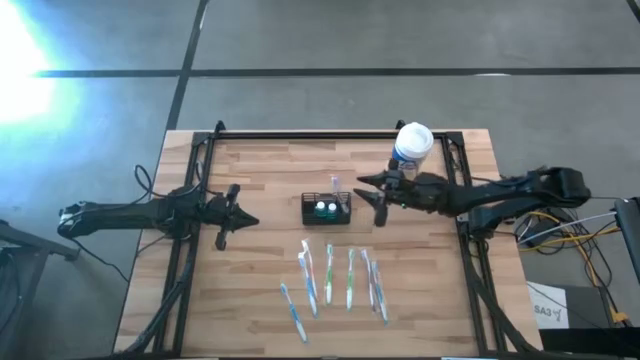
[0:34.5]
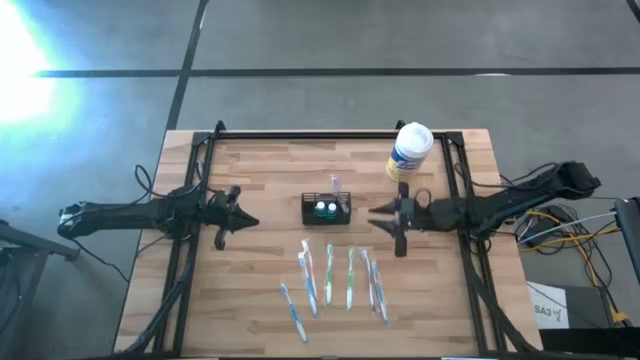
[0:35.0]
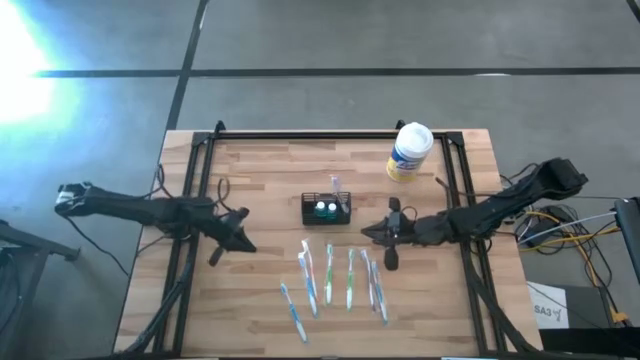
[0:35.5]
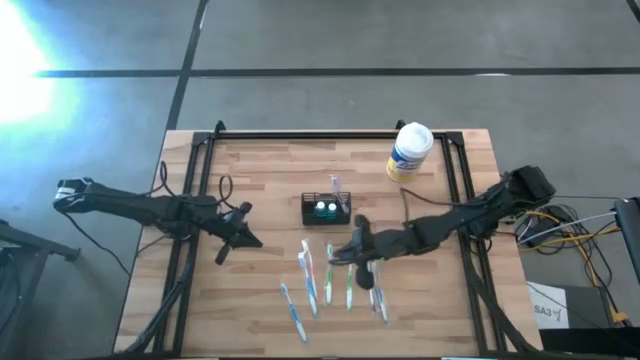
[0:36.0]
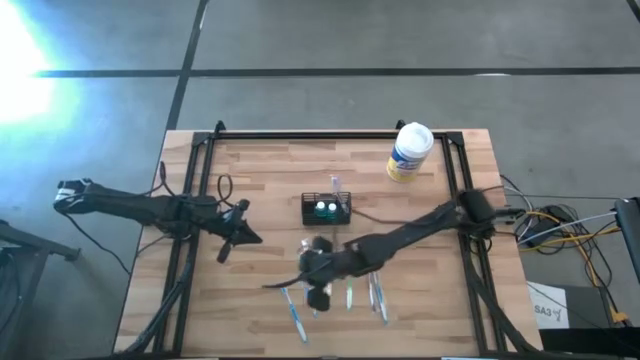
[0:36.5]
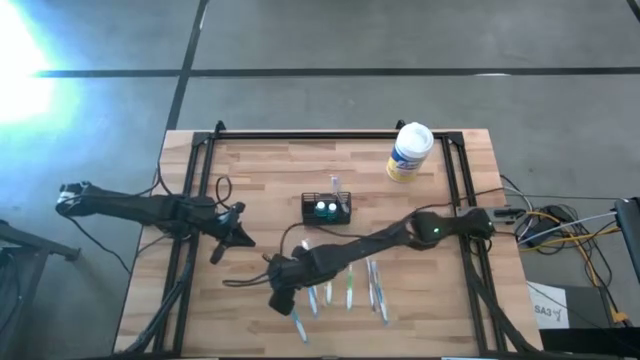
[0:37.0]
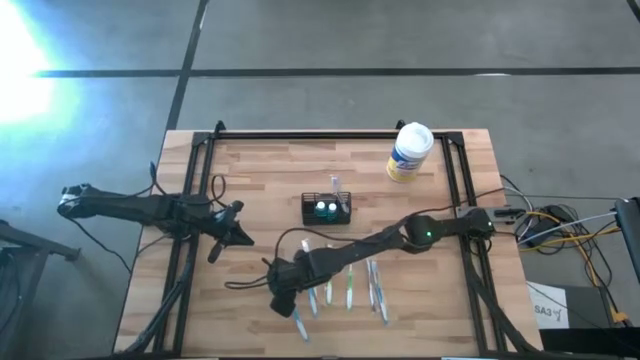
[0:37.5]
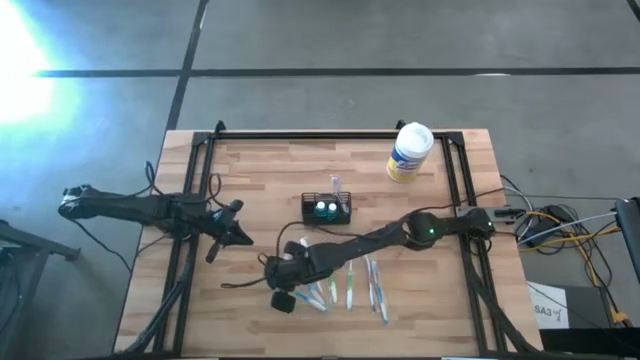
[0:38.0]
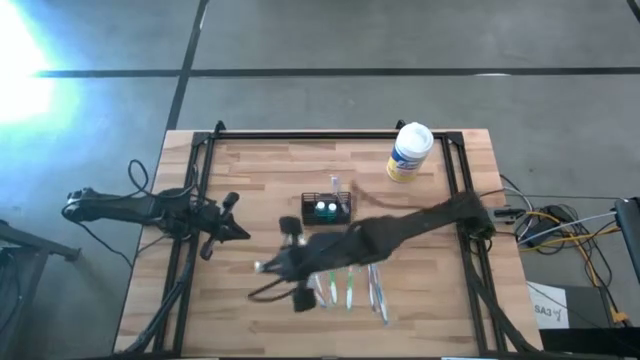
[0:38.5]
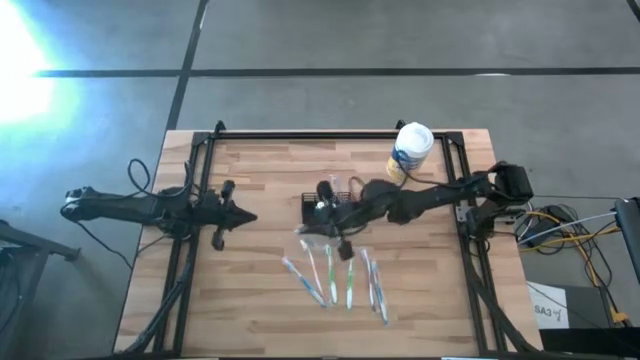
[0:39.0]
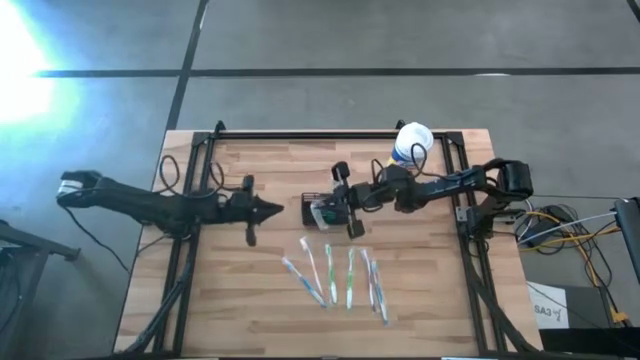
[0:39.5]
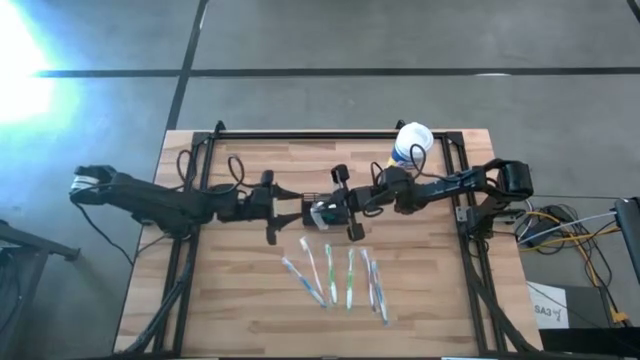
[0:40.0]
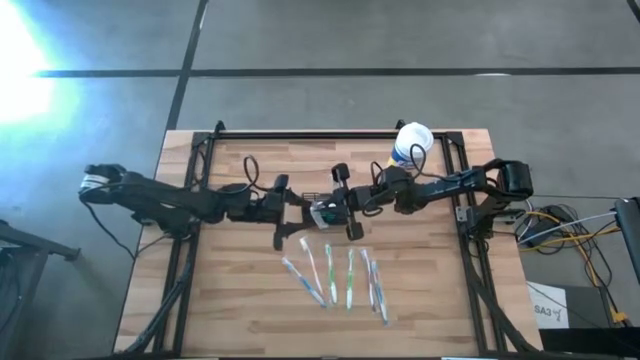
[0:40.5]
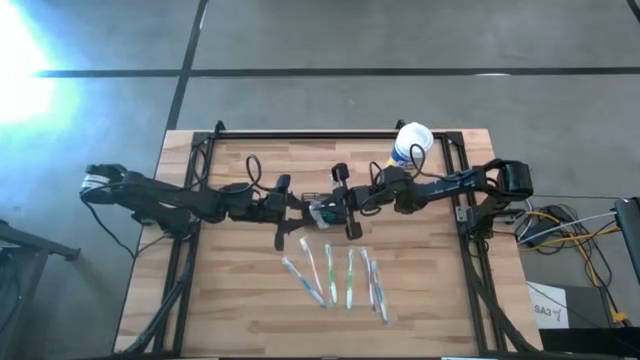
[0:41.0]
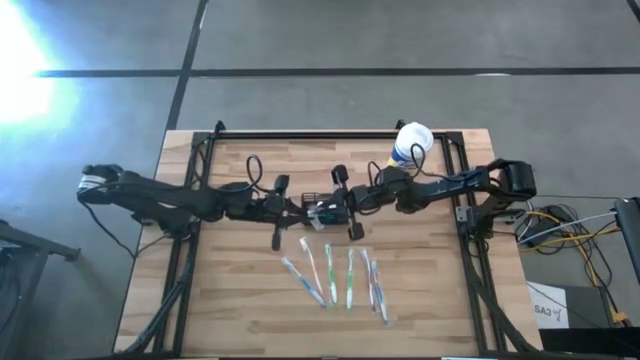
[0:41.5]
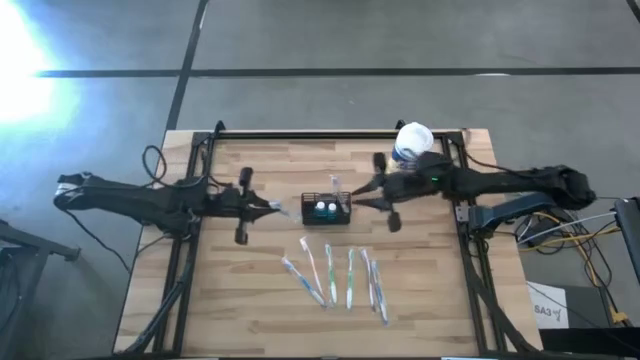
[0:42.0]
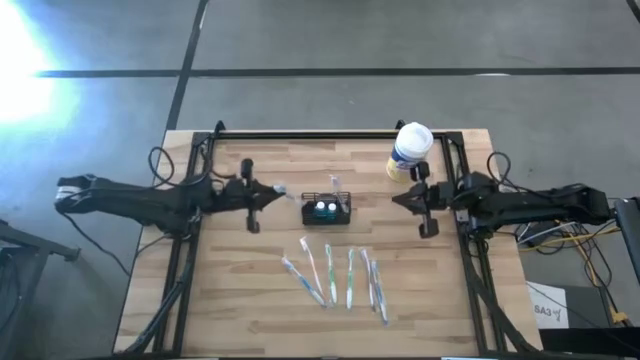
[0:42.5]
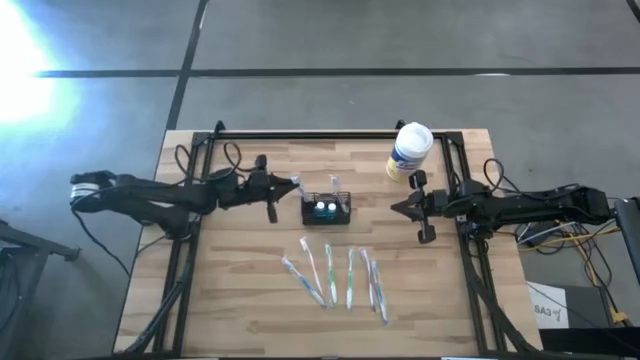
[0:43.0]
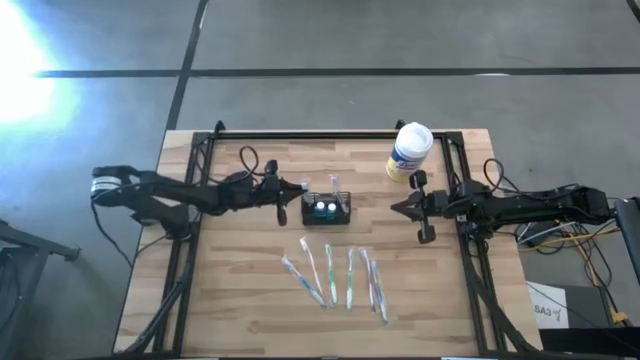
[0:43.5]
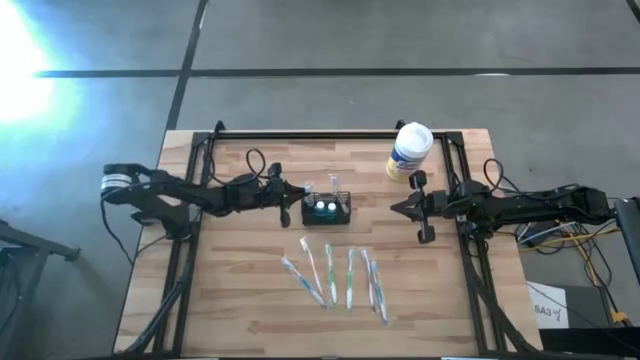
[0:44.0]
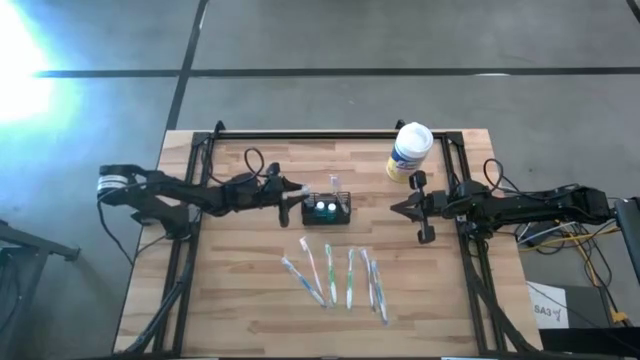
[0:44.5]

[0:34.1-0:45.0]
Task: Pick & Place toothbrushing station
Put the left blue toothbrush into the black wire organizer

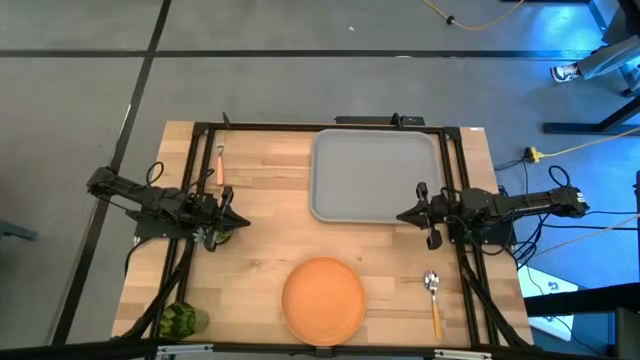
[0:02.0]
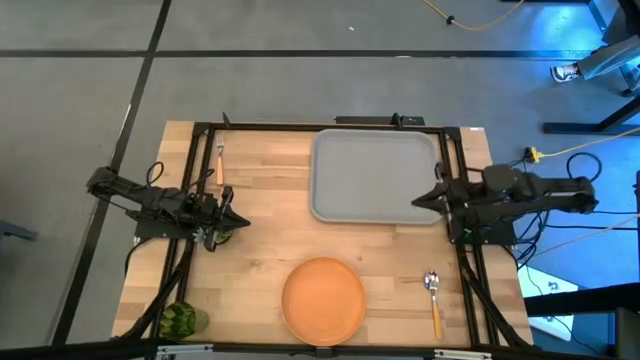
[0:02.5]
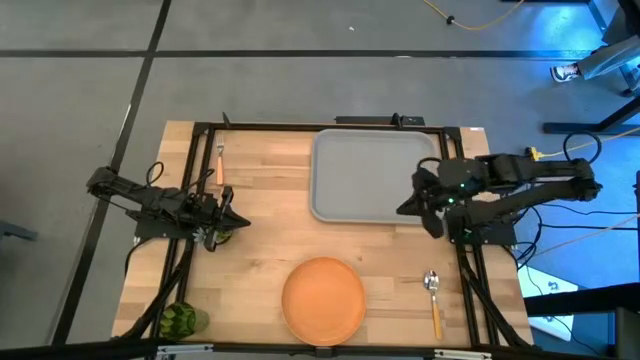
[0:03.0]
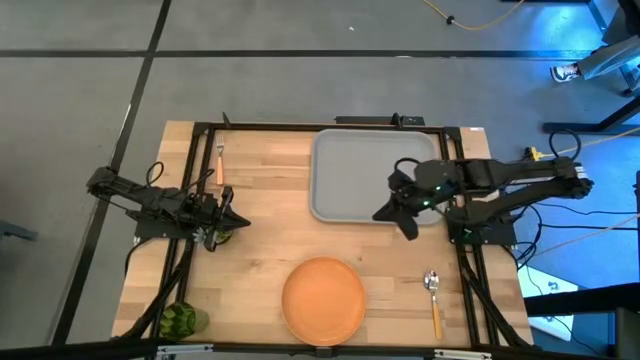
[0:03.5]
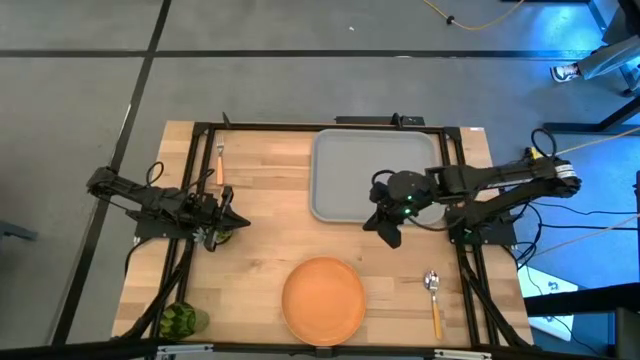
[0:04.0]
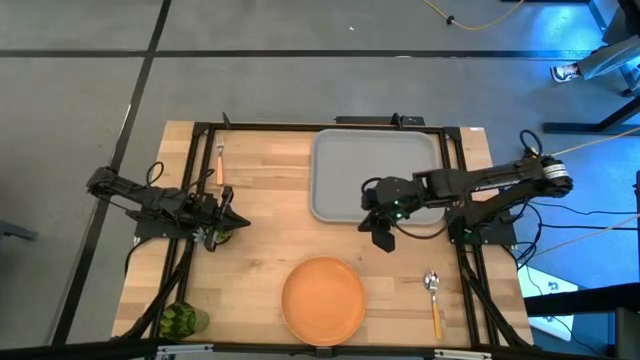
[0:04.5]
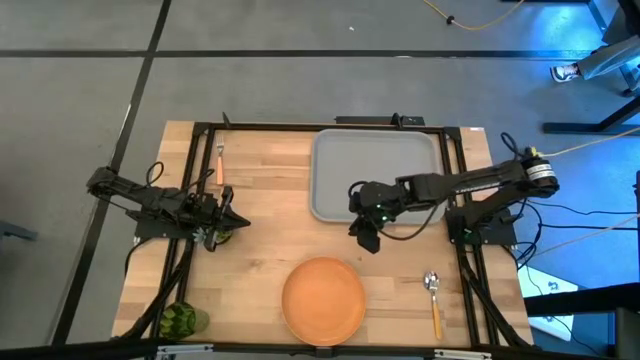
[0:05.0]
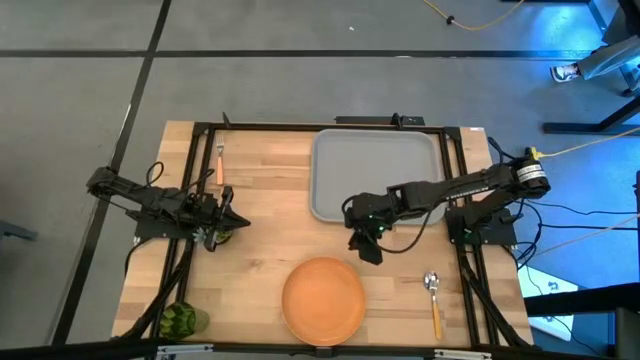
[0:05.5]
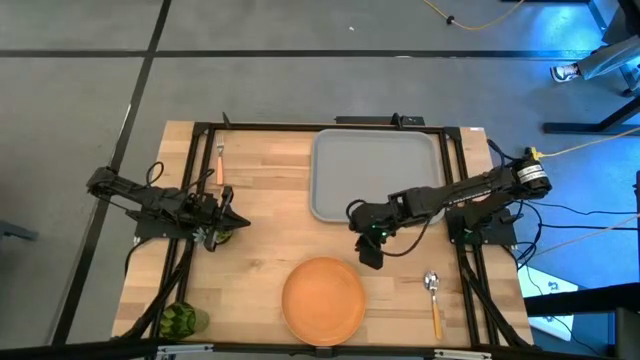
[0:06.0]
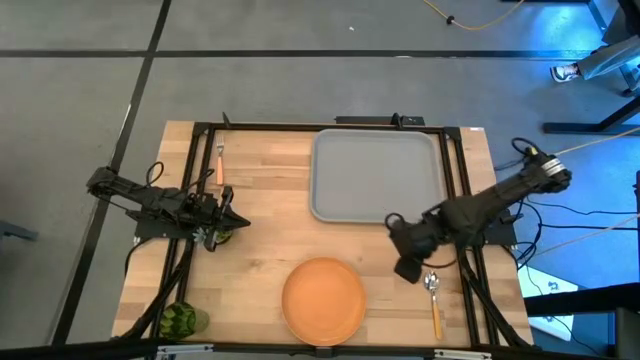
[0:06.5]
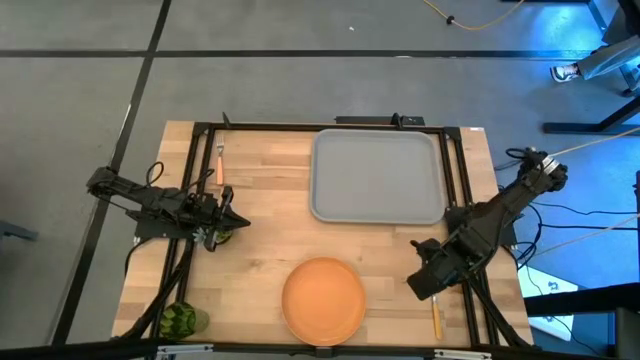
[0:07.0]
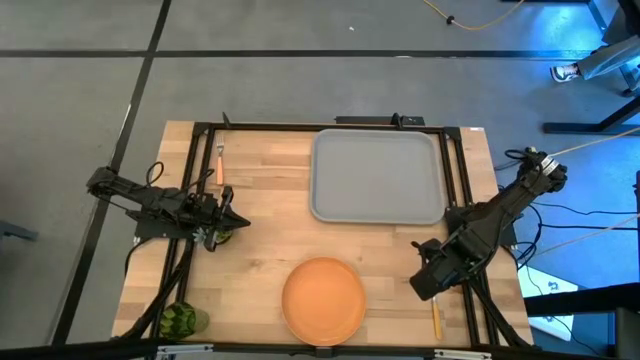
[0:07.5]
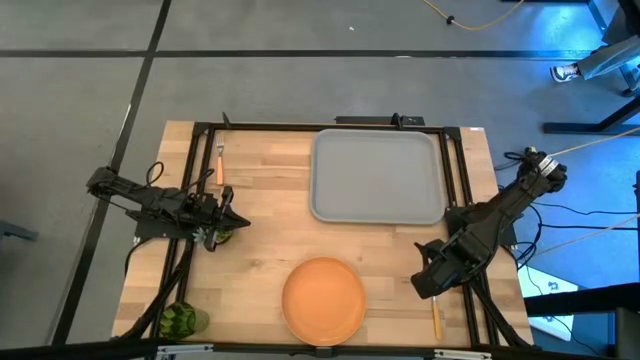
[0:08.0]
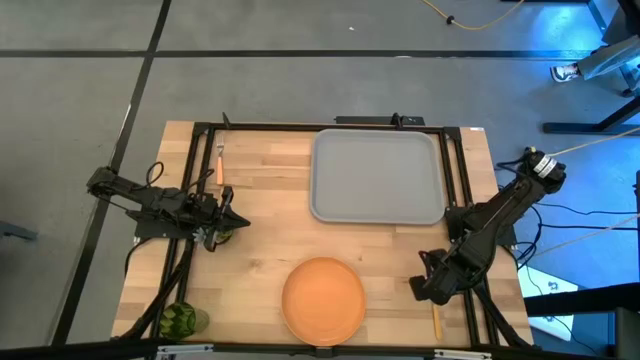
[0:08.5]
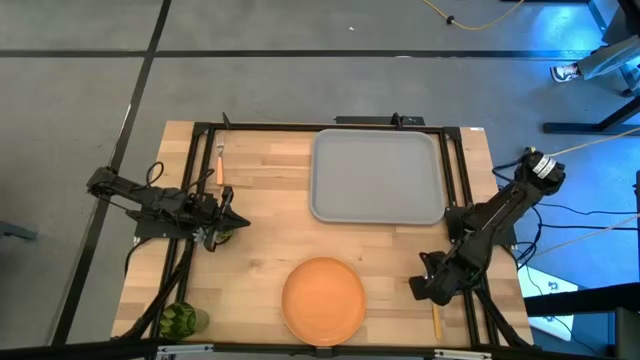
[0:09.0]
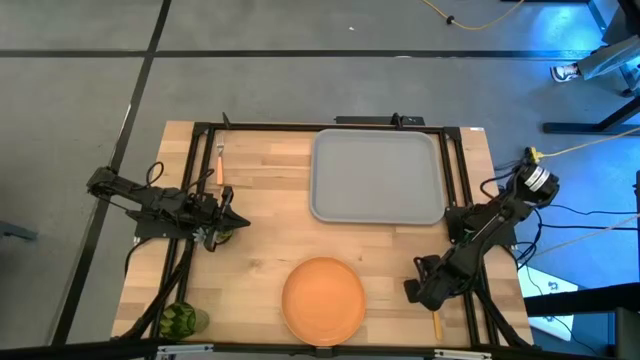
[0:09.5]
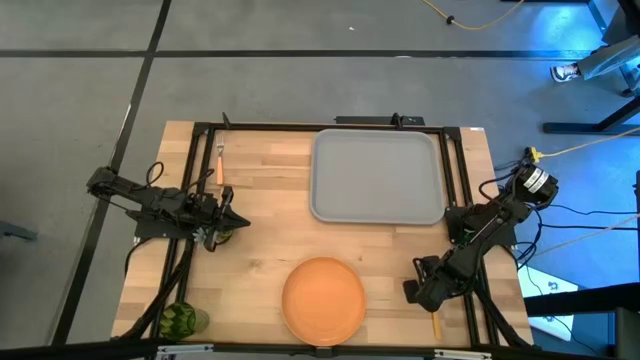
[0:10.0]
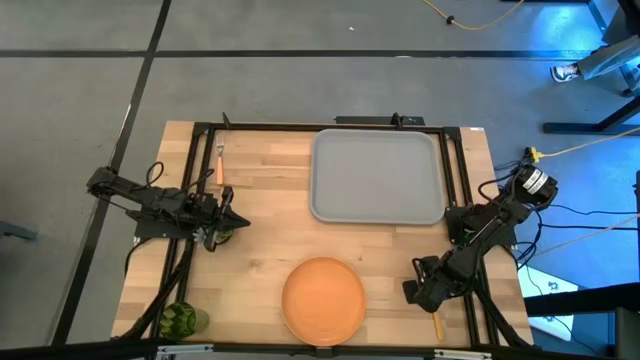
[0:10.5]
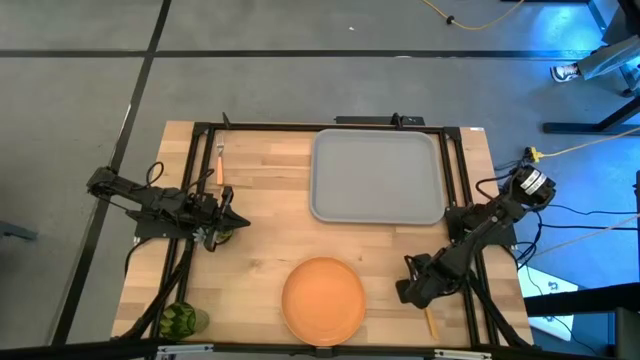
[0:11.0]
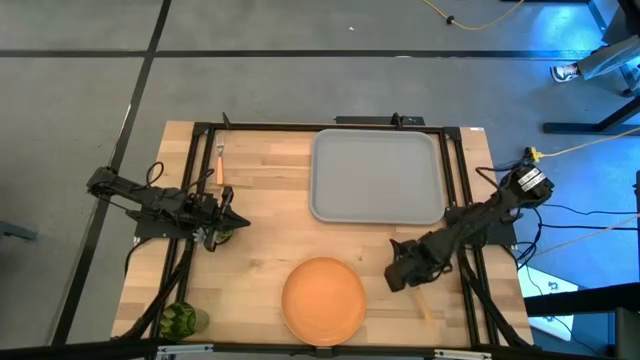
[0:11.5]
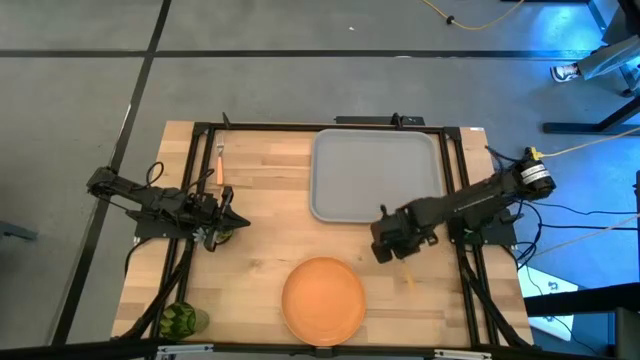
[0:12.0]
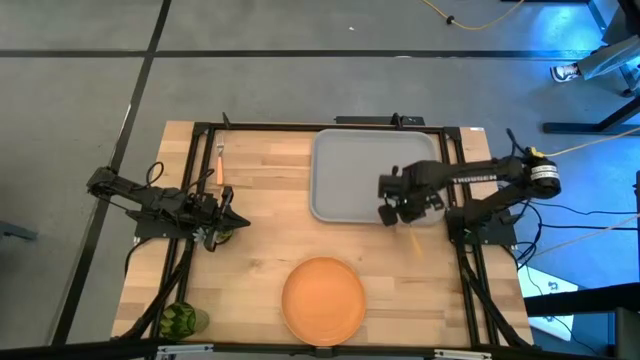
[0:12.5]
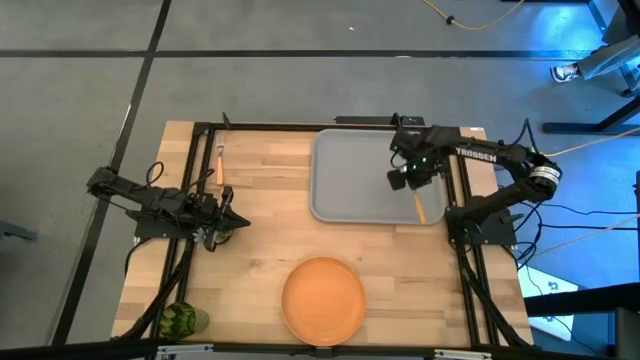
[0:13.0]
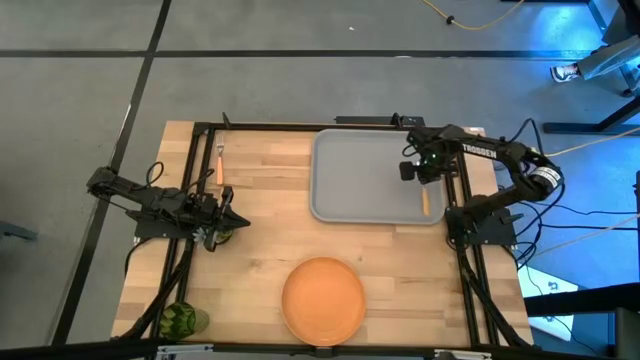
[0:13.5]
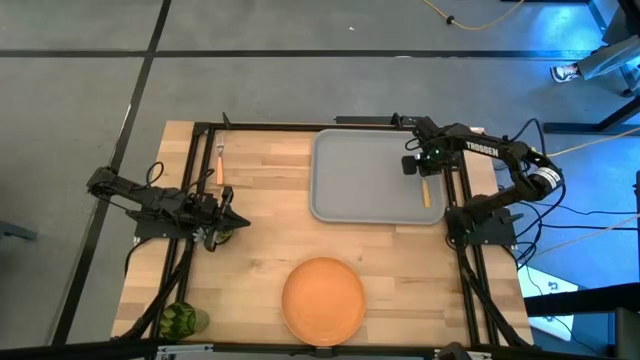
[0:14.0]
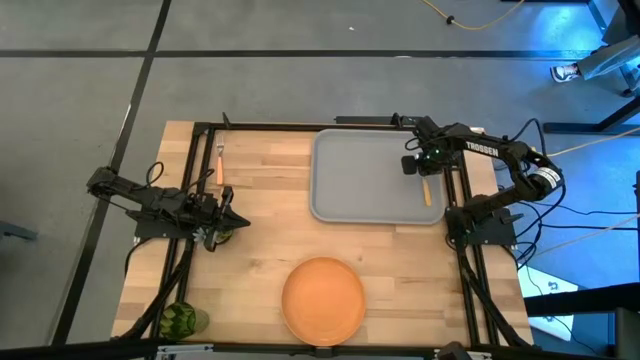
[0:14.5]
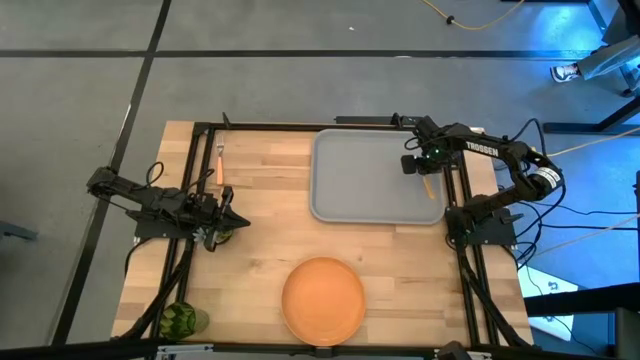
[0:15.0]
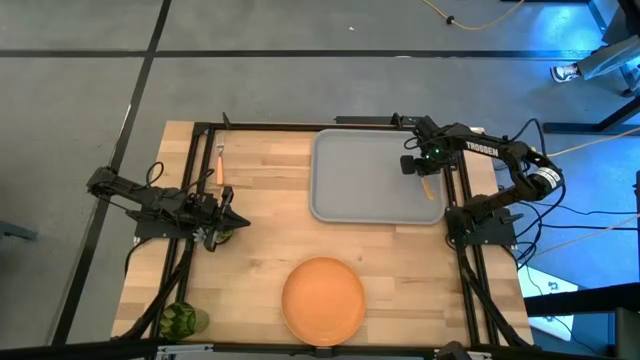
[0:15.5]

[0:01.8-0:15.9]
Task: Pick and place plate/cup/fork/spoon on tray
Put the orange spoon on the right of the gray food tray
